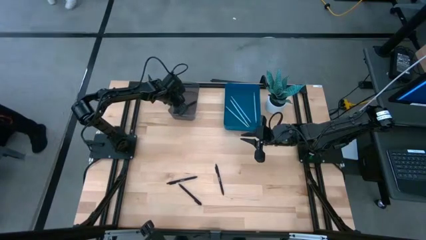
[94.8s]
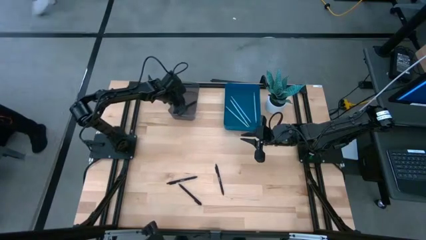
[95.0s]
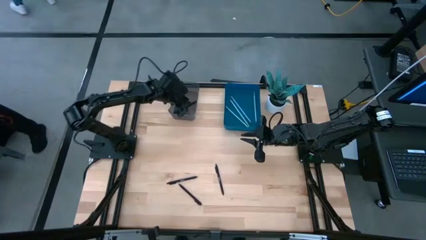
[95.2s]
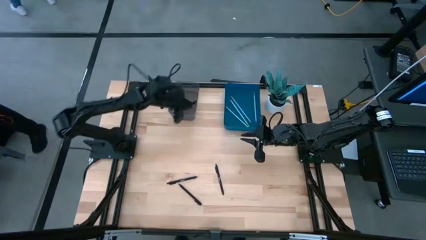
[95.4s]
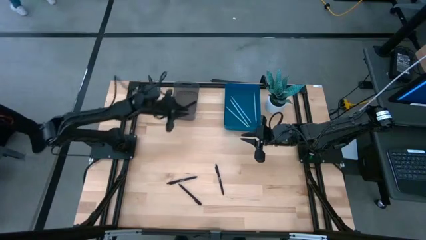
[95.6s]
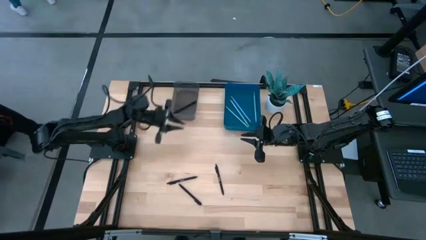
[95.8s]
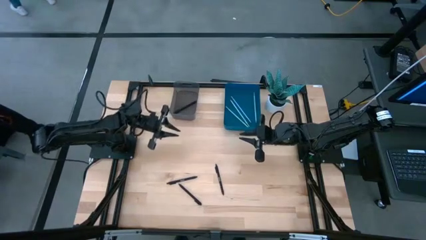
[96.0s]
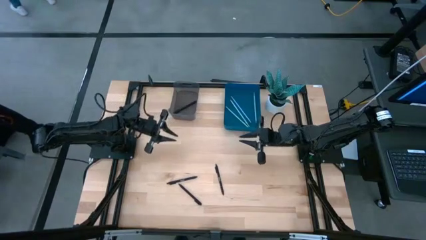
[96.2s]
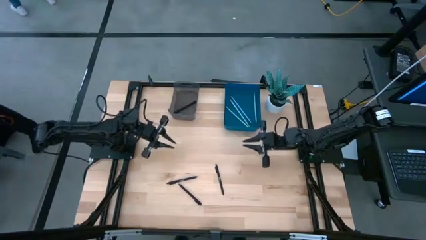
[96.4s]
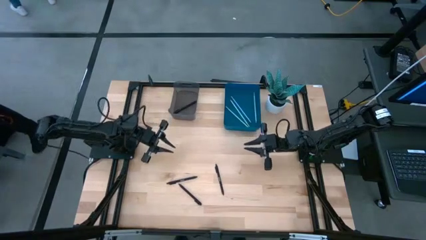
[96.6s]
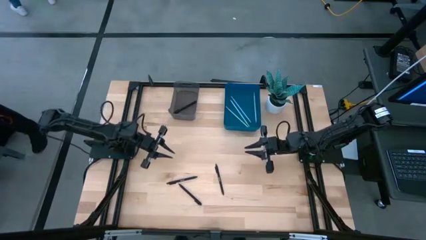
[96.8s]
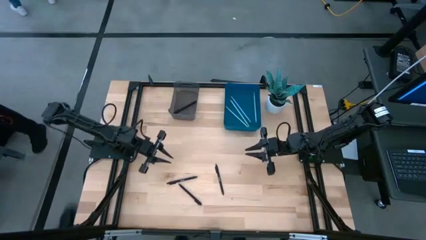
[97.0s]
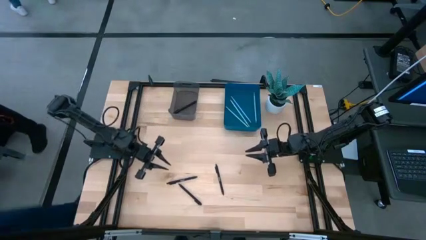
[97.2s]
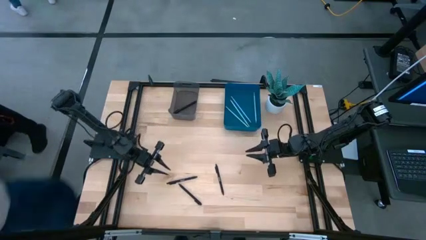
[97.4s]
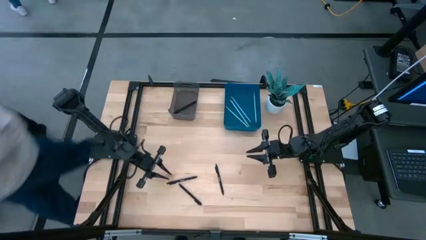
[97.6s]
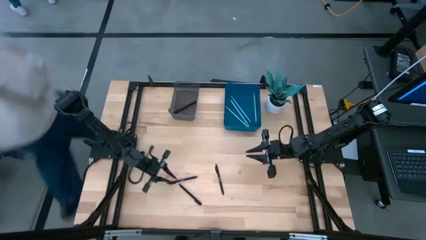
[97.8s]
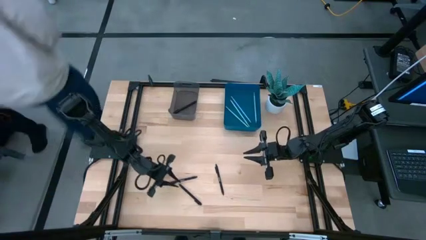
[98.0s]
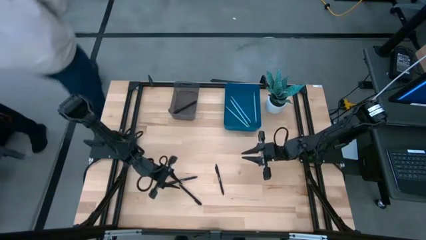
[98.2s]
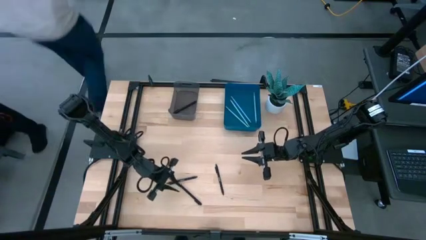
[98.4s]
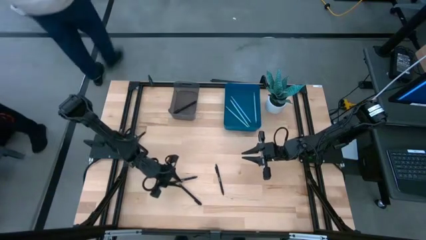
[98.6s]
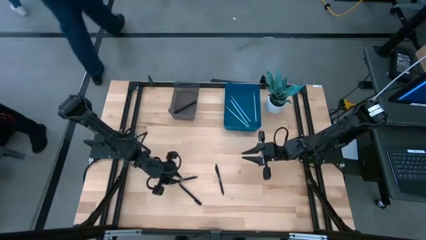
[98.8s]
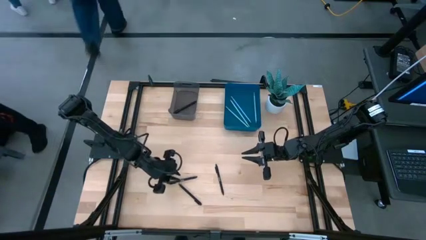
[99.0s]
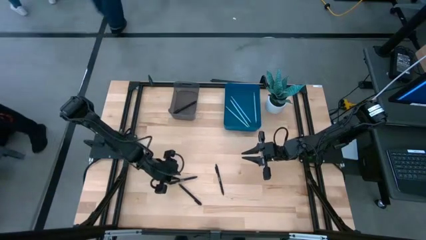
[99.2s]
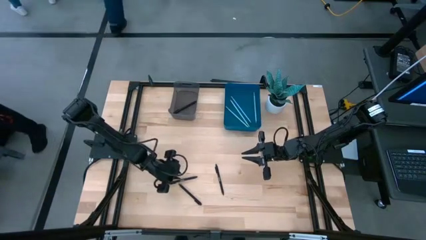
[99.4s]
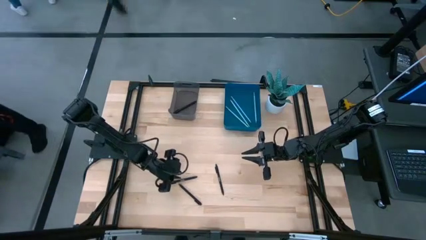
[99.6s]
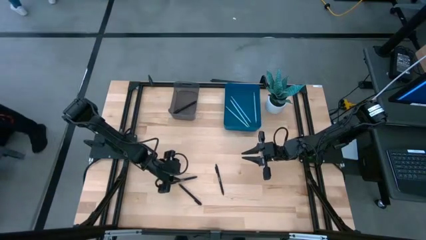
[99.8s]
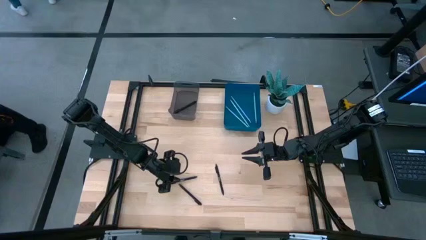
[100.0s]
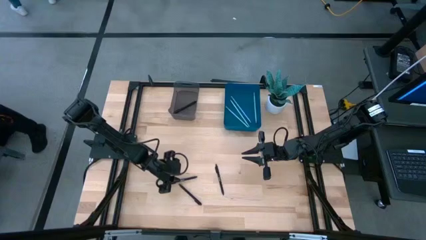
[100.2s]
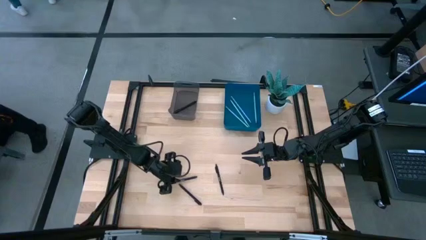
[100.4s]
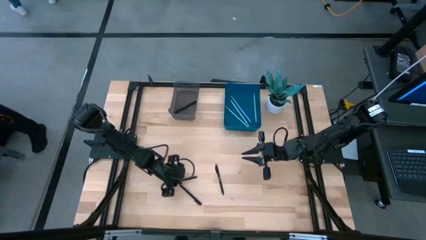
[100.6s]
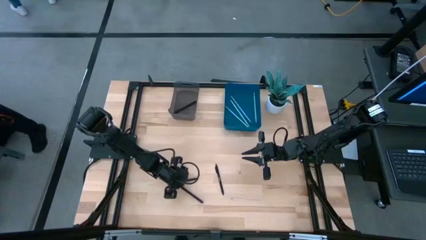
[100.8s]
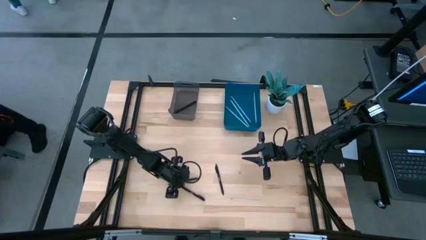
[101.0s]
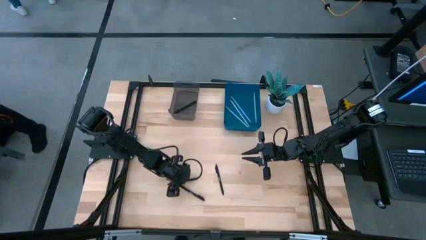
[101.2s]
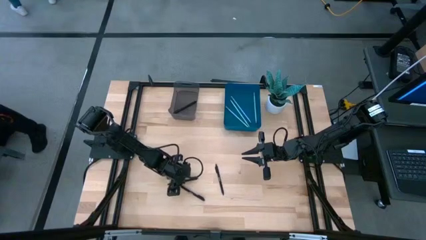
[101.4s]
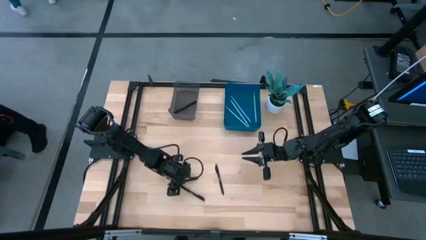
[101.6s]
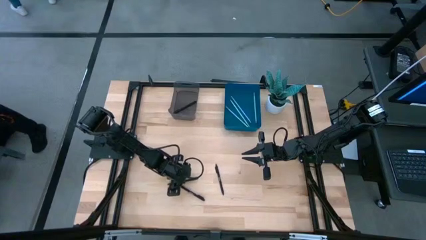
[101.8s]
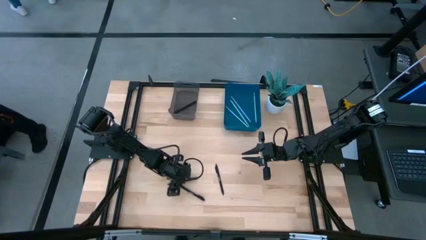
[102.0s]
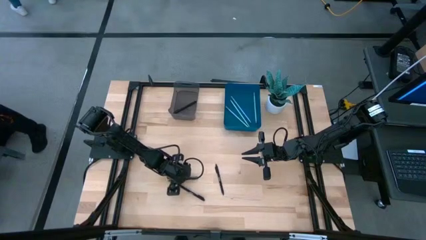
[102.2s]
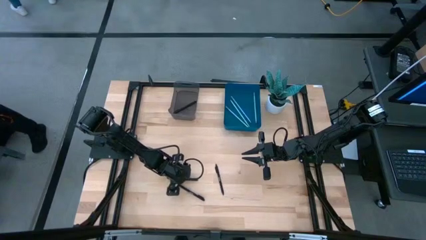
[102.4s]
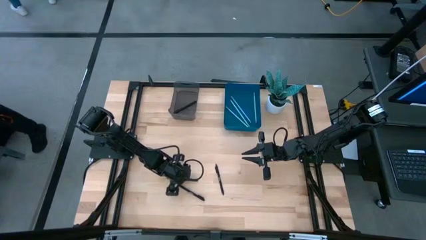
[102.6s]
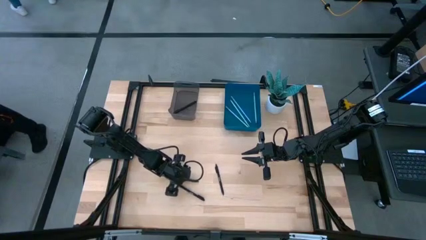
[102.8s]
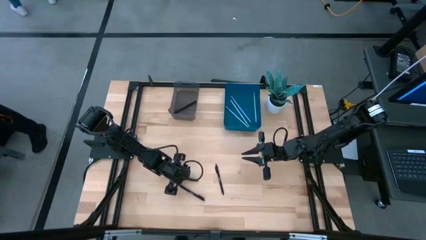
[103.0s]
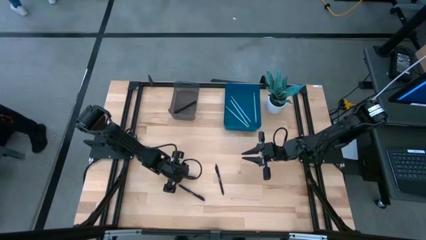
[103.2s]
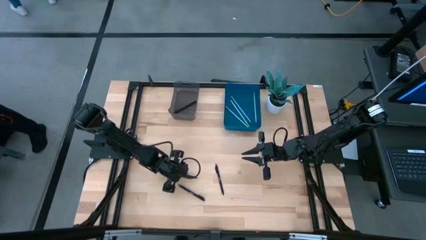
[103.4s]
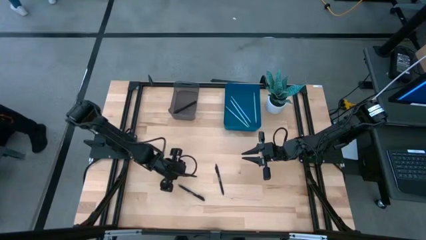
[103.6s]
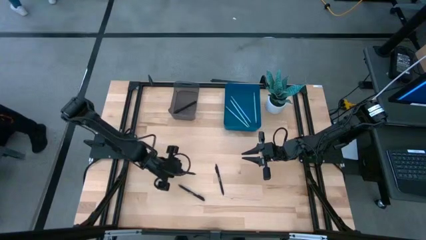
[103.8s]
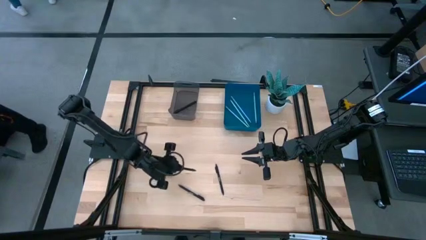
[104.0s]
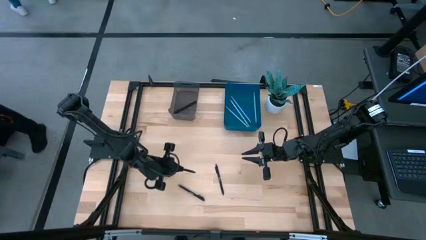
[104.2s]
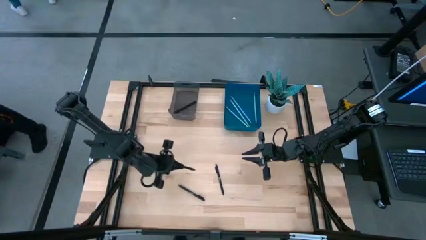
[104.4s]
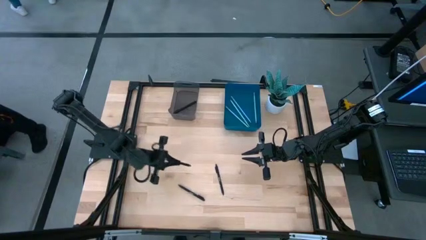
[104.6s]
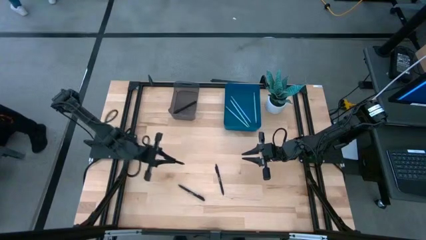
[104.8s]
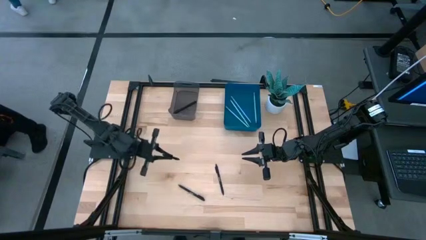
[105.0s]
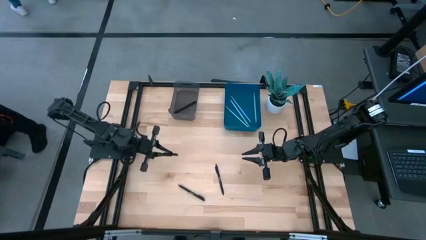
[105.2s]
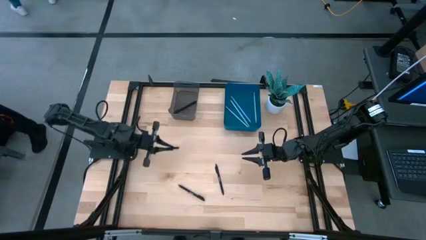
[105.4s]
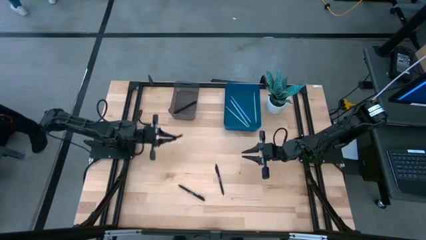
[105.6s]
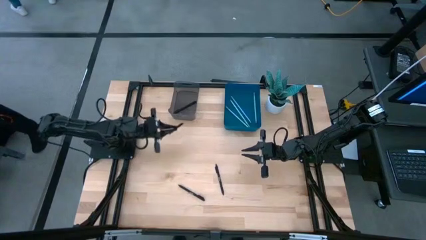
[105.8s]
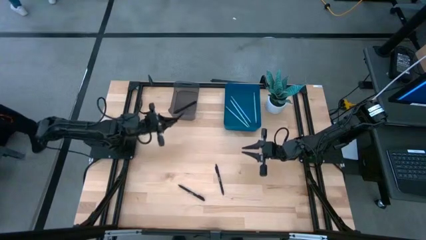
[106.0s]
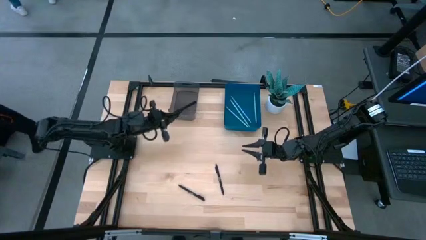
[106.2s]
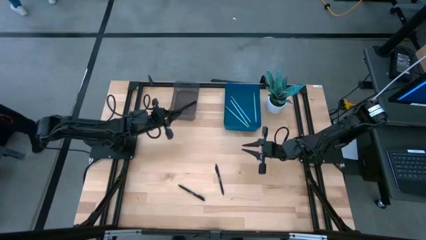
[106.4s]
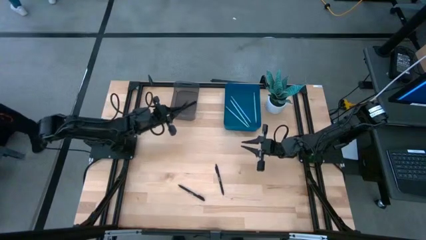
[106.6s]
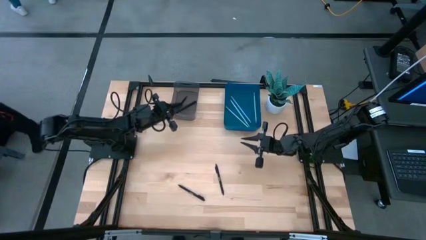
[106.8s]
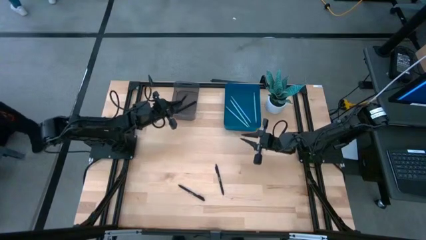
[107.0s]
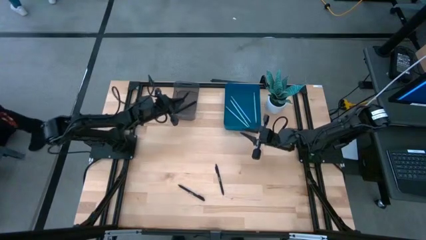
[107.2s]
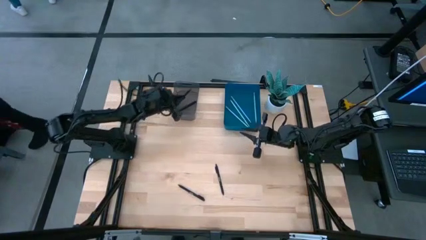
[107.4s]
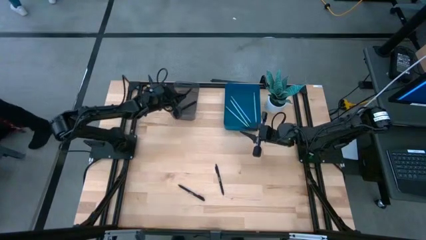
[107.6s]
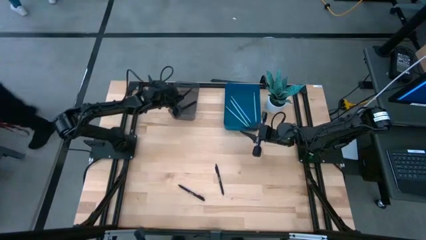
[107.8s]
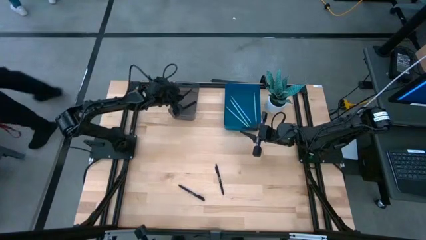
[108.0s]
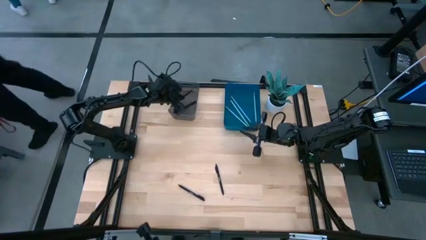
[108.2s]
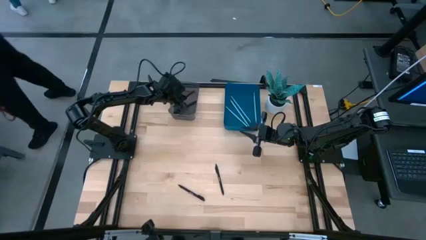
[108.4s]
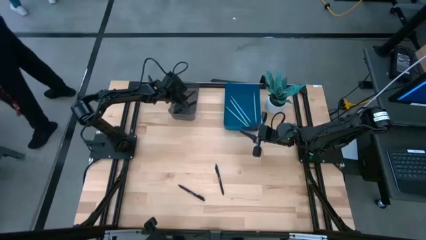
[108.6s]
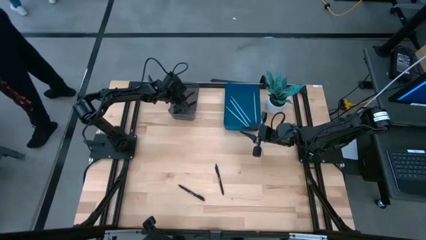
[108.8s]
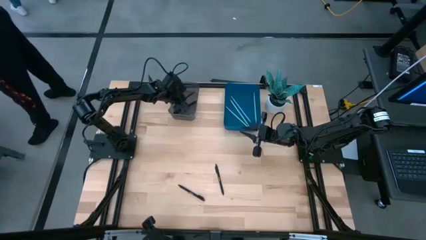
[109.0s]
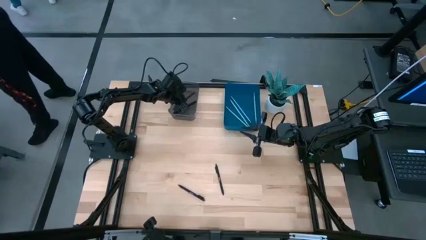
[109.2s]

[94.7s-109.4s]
Task: Sort pens & pencils
Put the black pen into the black bin

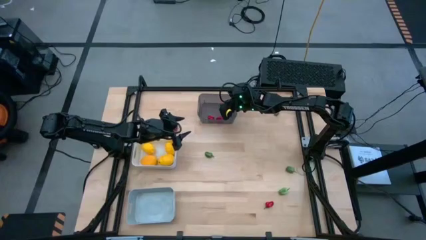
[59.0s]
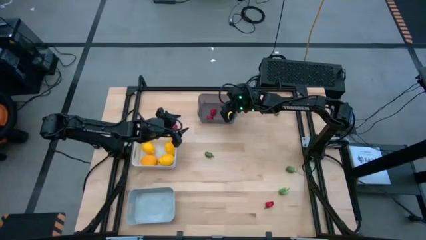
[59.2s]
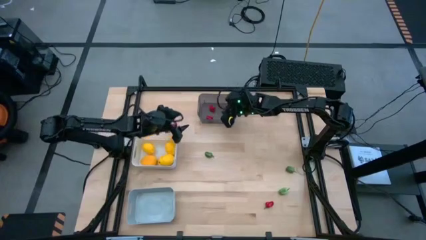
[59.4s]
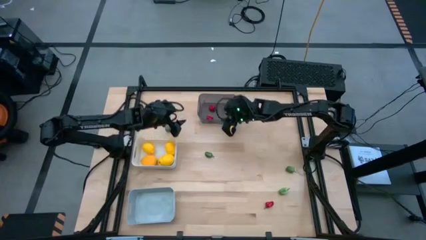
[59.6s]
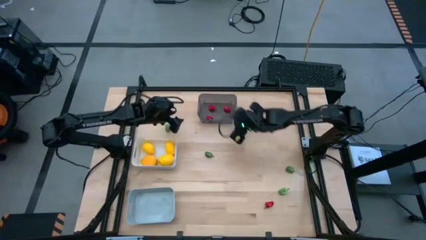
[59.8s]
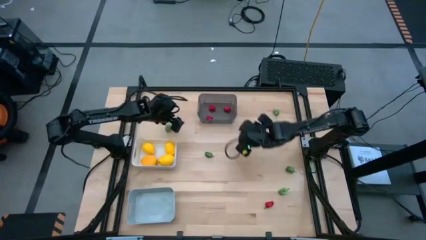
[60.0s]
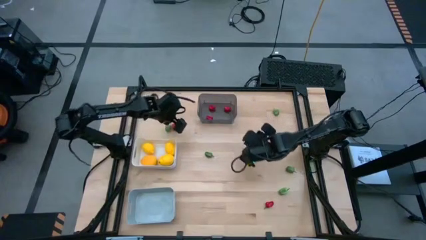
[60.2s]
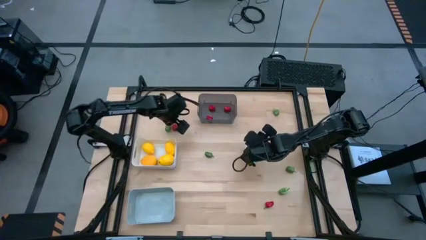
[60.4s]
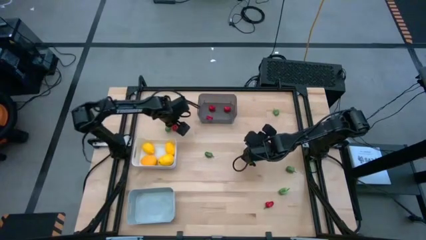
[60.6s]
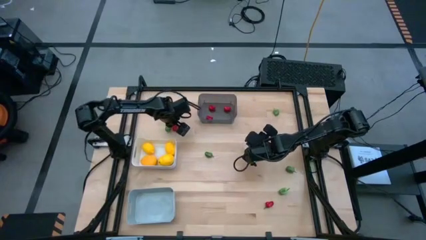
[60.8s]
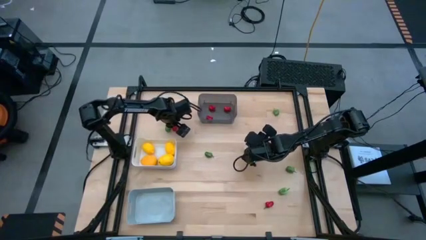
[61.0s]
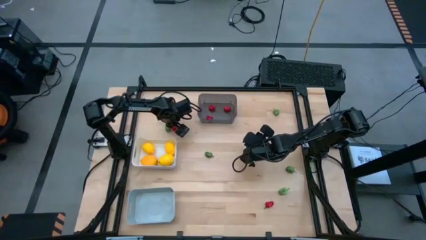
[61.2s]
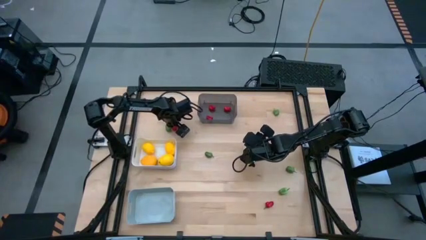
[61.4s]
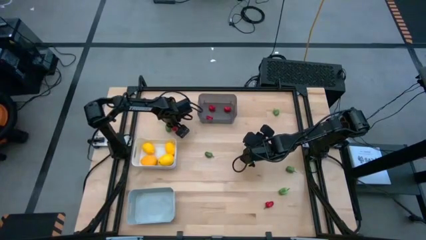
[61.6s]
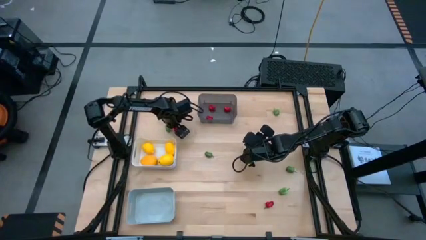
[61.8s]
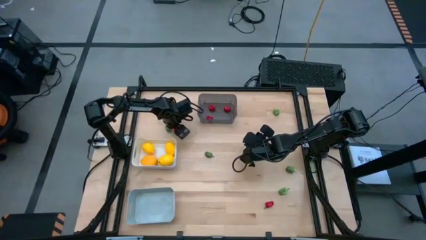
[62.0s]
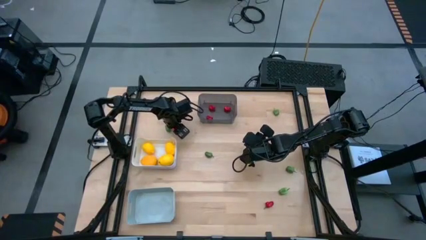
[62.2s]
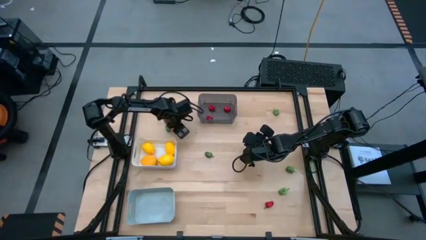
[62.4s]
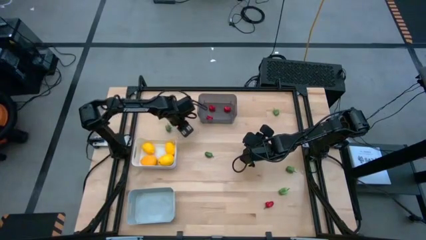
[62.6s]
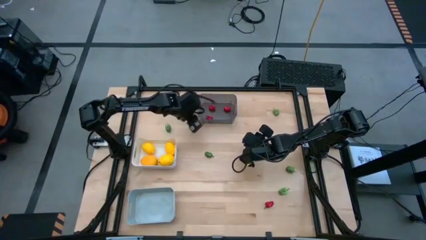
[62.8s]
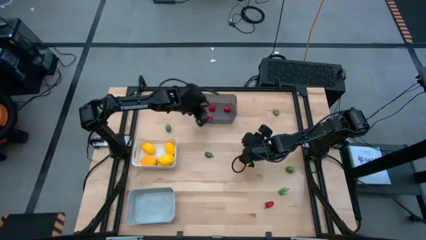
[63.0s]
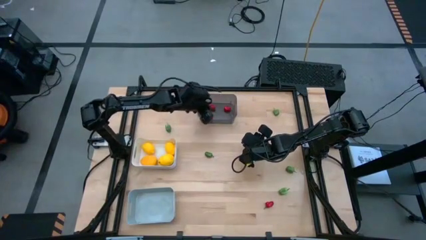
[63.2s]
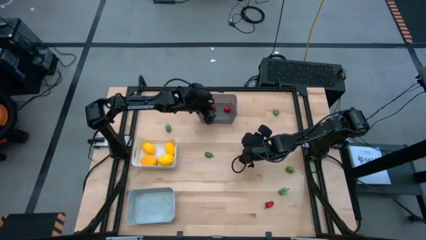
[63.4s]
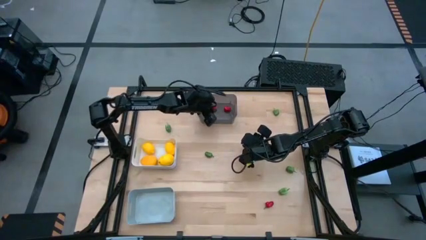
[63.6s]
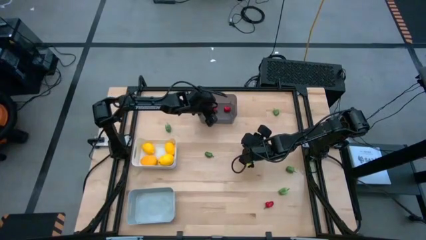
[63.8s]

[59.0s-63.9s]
Task: Sort produce into baskets
Put the red chili pepper into the black transparent bin
